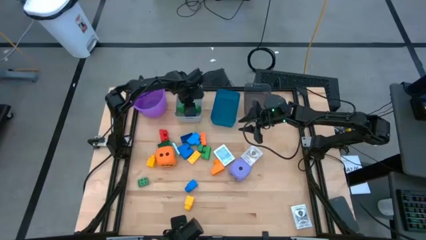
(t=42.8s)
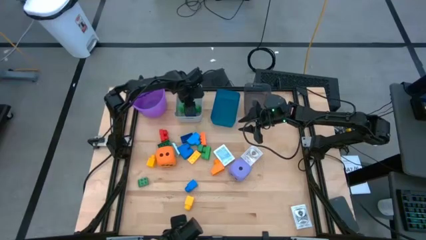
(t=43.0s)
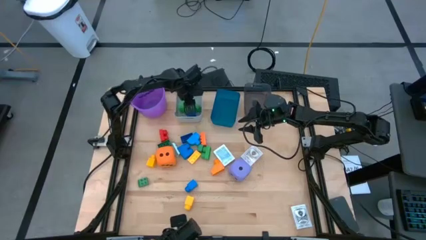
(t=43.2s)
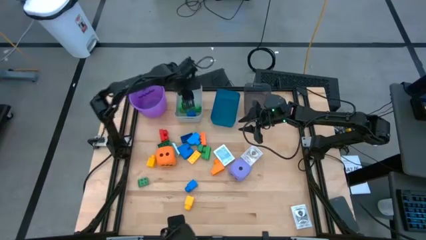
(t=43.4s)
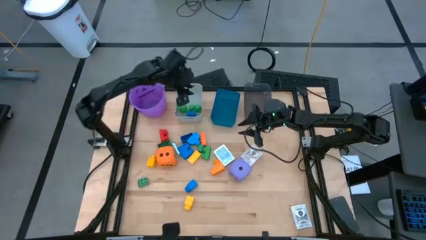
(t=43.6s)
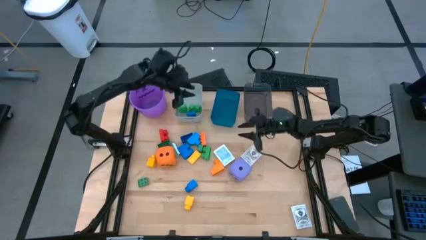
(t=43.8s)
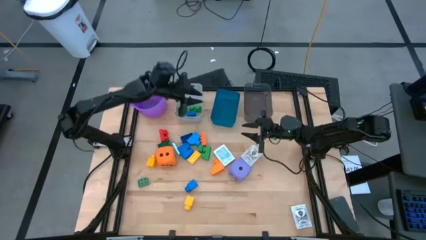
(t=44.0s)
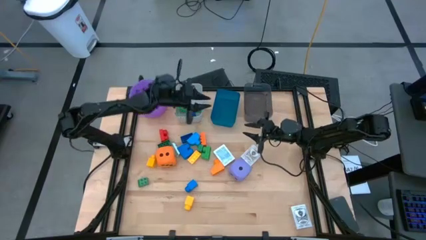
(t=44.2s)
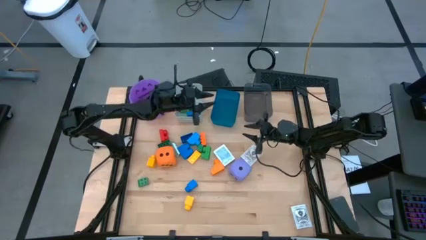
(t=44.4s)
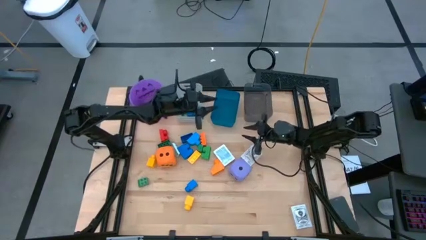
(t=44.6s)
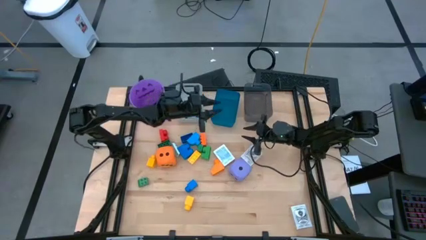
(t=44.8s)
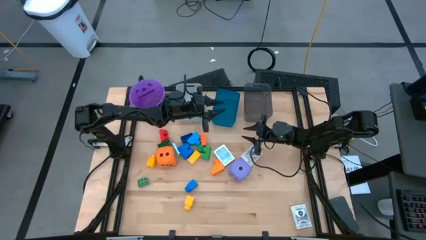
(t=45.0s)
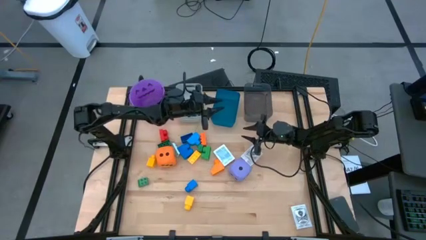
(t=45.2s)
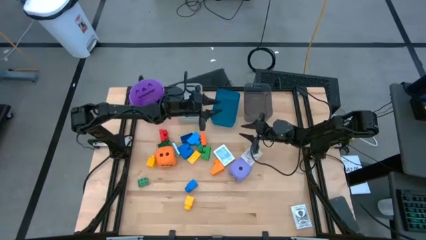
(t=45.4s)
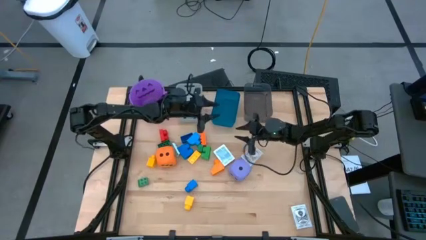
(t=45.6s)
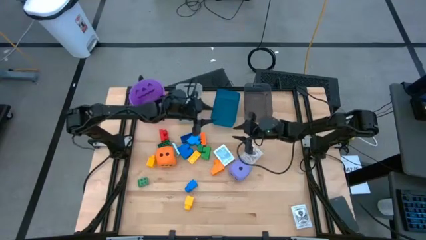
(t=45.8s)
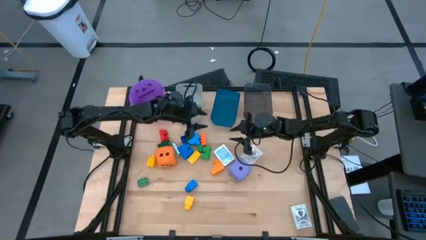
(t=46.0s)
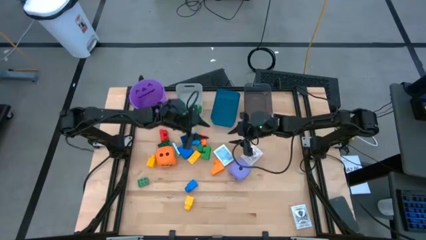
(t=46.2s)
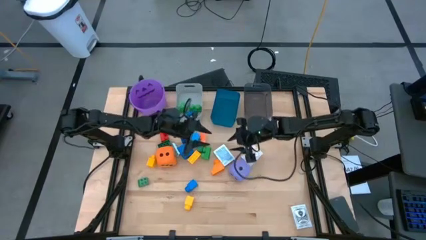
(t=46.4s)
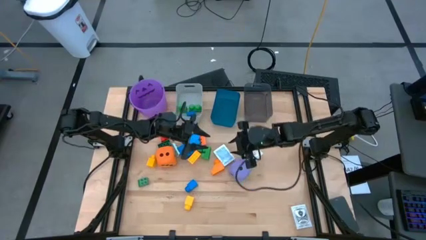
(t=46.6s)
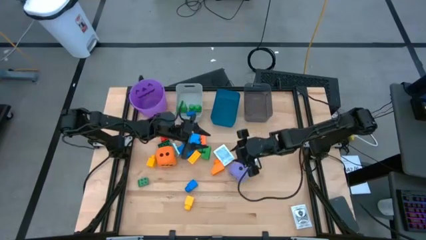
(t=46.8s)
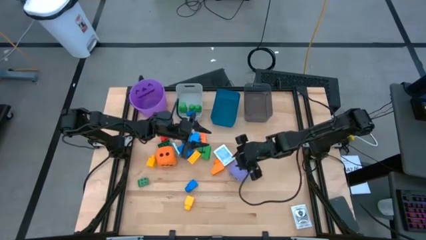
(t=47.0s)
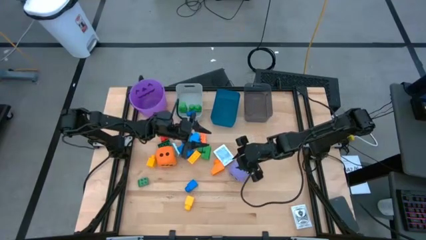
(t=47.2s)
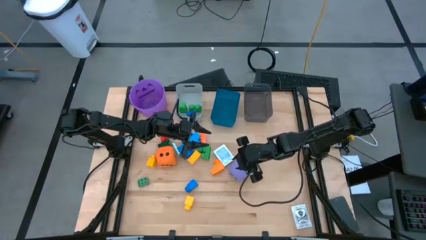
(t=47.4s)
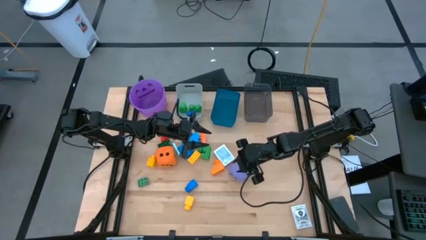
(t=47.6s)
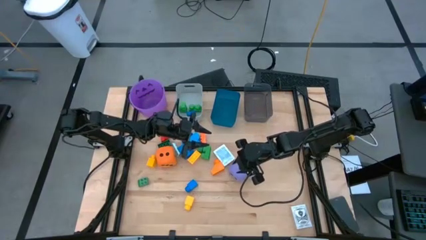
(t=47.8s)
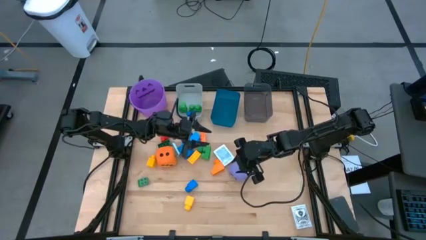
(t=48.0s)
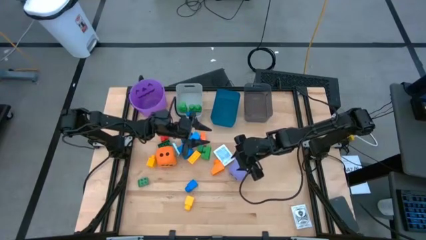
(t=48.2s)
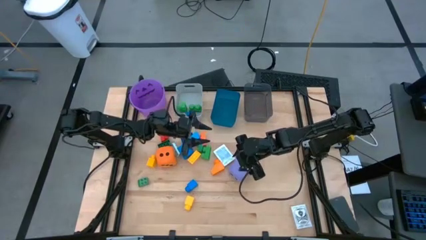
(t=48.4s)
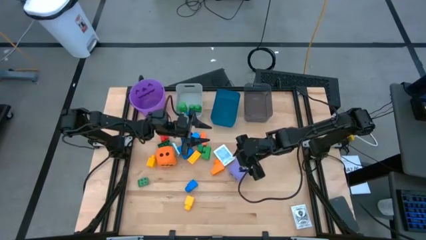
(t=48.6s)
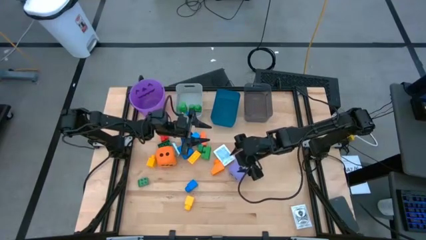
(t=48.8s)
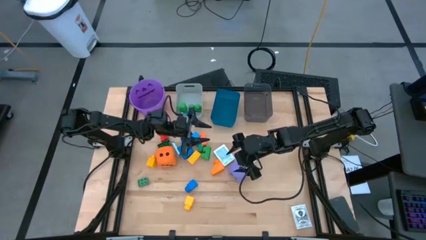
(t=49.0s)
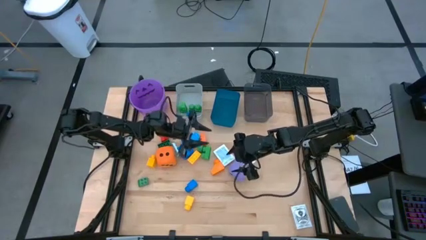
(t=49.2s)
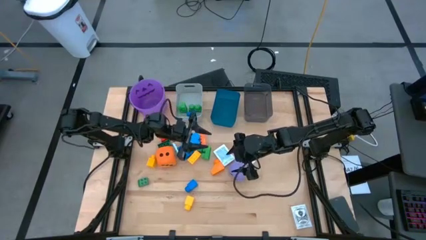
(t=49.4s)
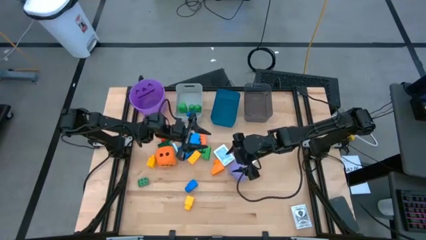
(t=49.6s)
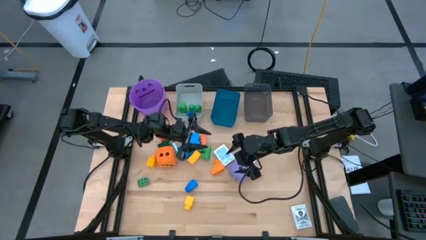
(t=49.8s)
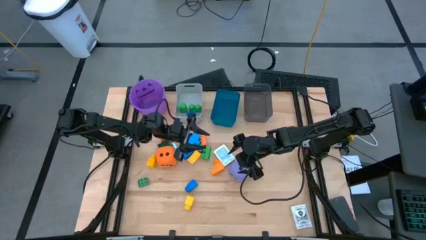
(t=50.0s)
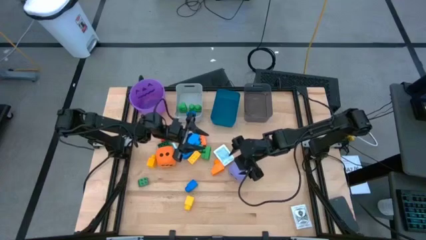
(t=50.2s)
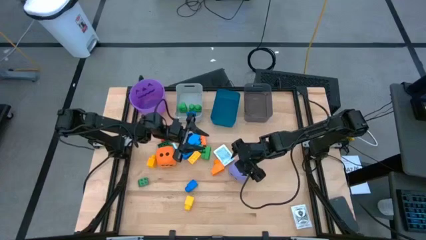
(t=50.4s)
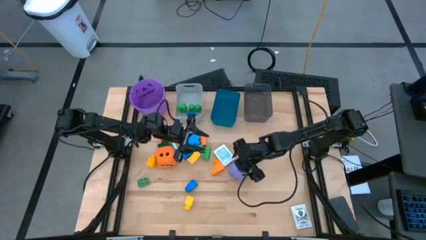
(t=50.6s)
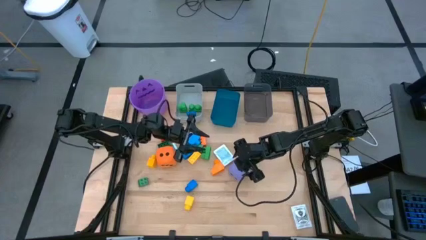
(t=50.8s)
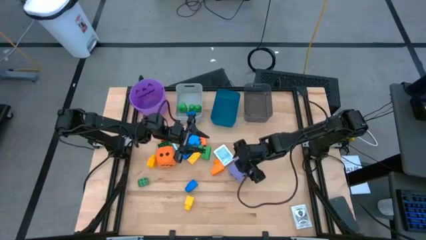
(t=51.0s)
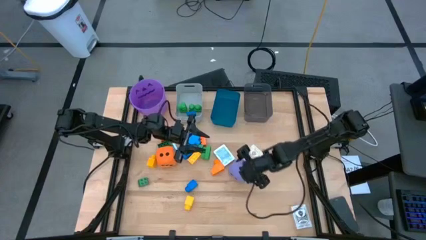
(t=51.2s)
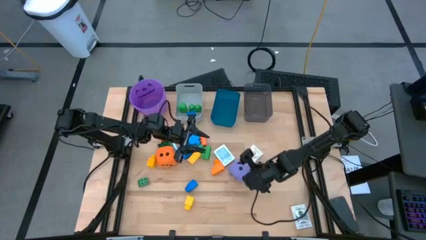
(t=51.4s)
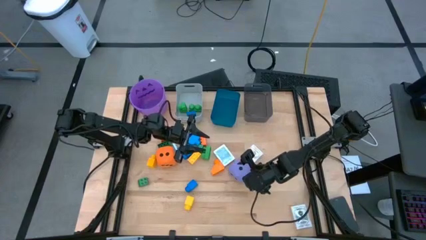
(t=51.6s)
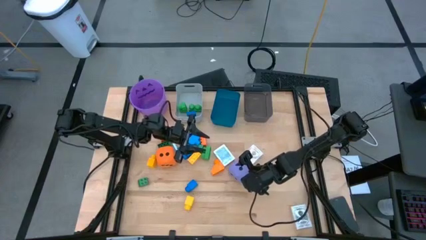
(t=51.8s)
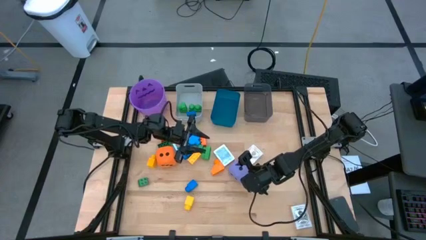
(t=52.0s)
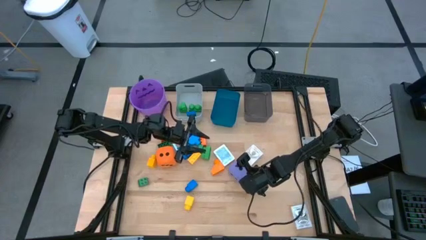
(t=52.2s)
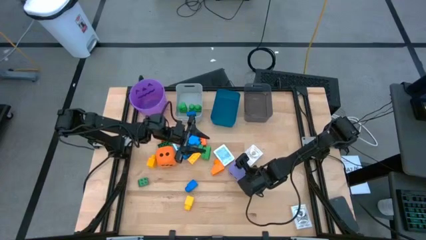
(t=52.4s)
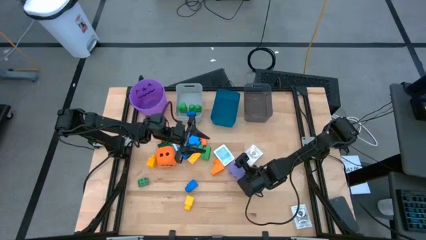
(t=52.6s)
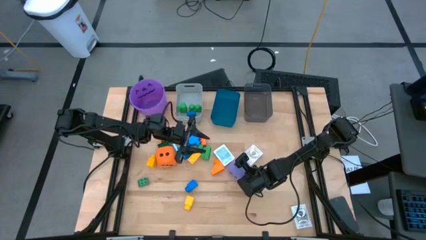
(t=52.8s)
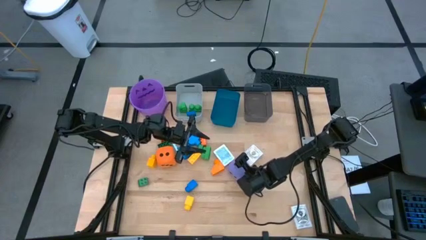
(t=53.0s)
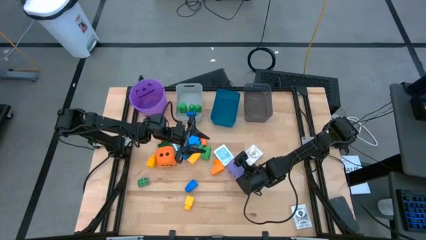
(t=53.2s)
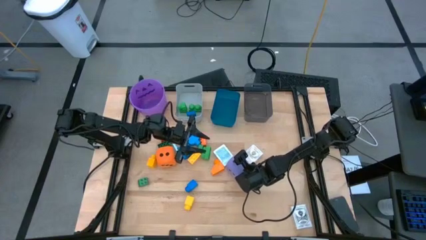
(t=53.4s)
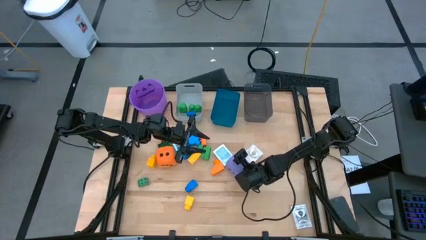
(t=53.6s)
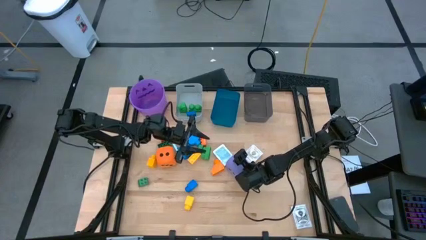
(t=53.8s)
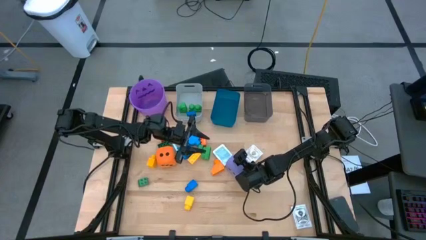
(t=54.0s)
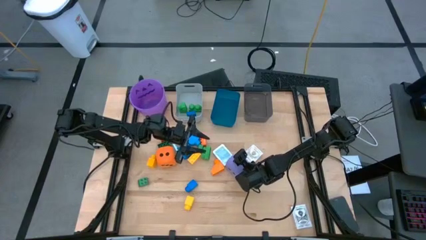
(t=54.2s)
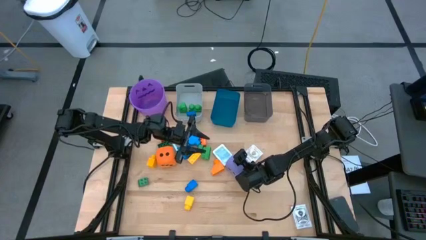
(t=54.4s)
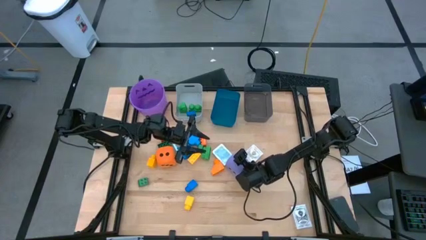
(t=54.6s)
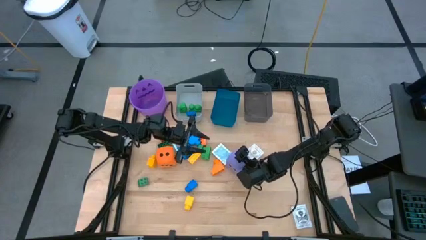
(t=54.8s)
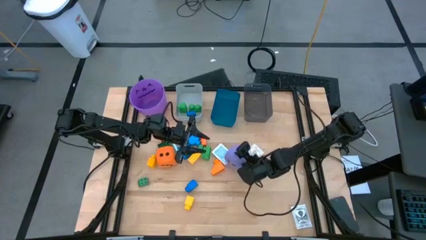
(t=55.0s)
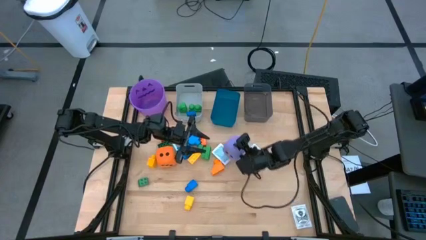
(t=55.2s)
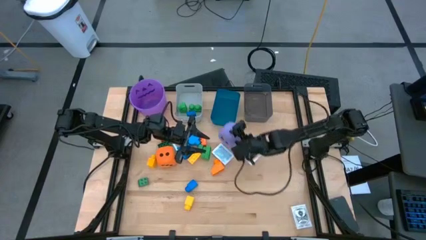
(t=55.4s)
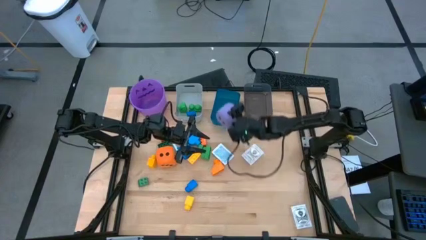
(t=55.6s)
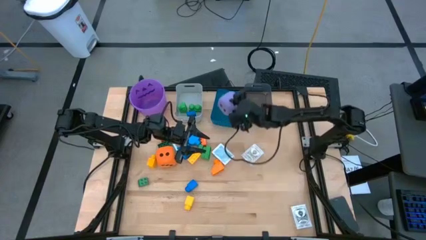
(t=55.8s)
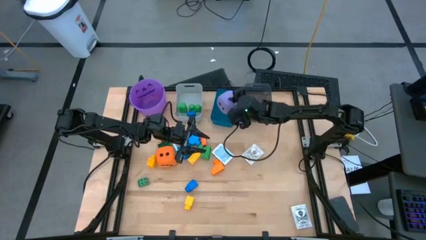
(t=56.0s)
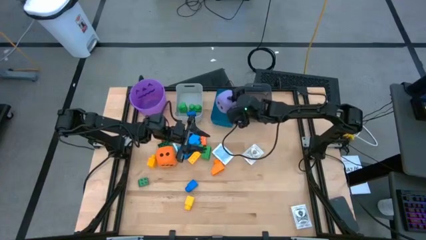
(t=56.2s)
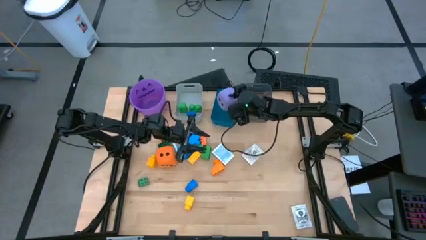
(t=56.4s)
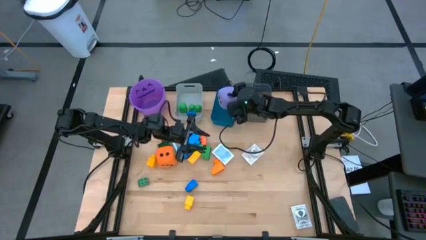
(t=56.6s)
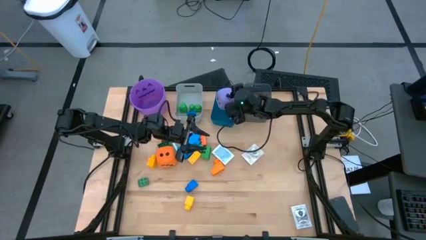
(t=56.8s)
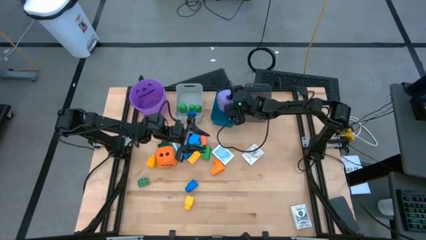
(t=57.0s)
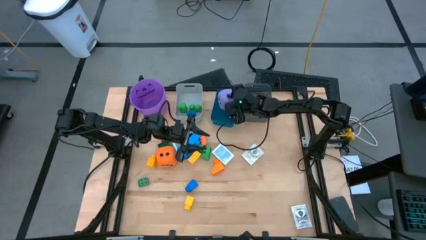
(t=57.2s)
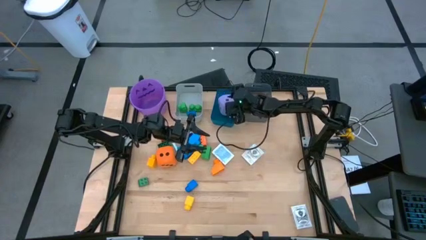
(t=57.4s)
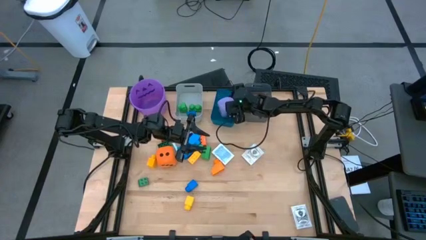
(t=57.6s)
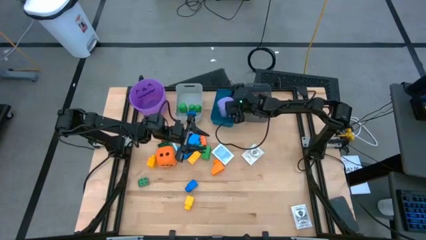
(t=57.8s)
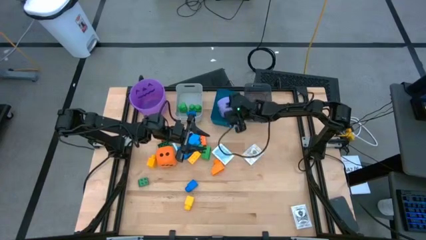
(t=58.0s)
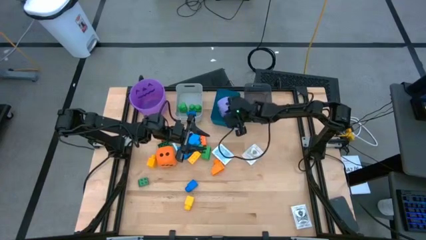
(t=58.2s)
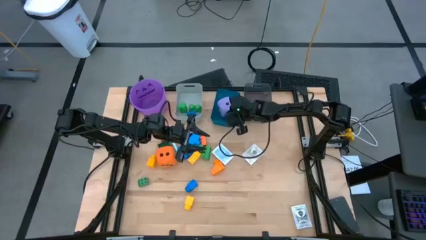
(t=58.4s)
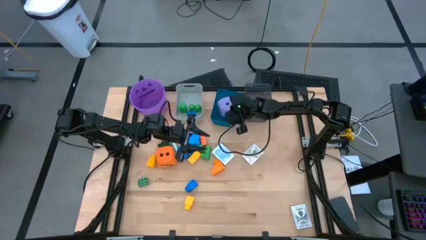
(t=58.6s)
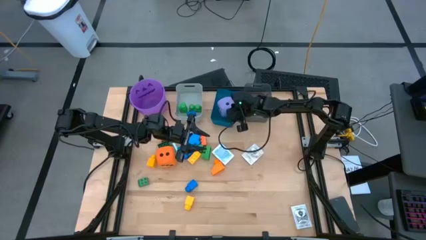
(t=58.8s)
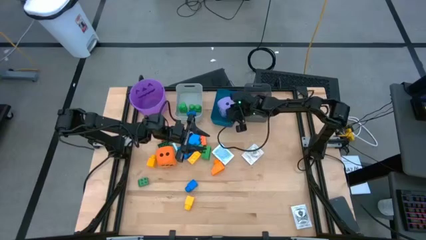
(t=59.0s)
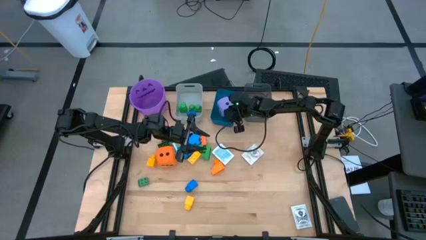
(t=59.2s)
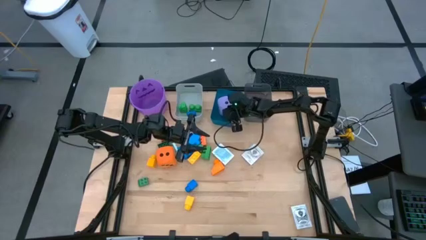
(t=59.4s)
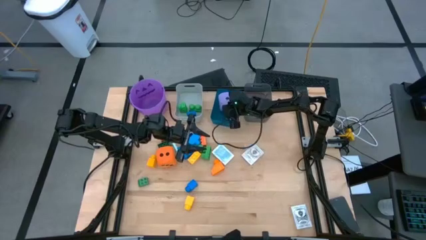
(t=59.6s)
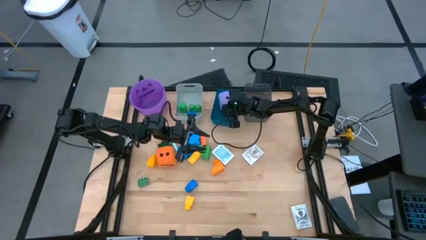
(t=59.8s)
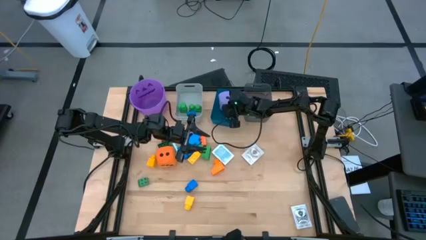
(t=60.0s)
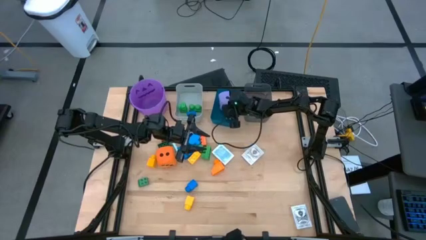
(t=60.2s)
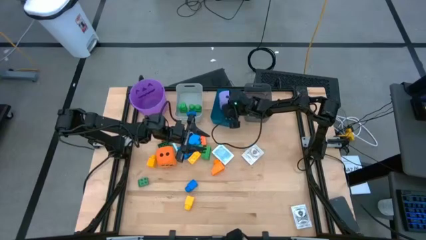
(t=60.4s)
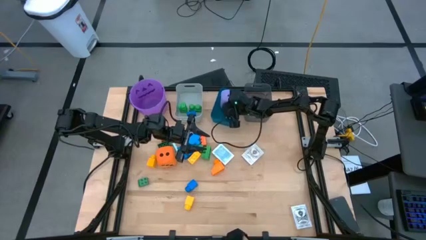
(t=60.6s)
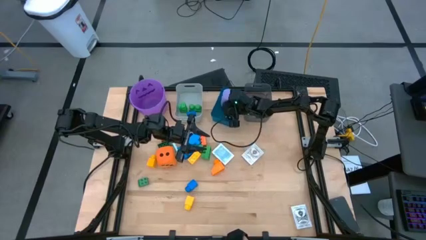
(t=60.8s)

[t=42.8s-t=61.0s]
Task: Pick & Place Toys
Put the purple dice into the blue bin
